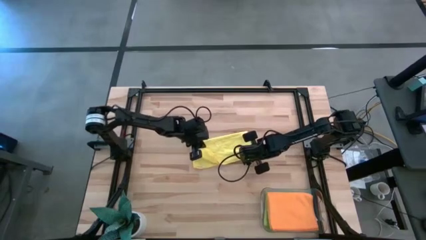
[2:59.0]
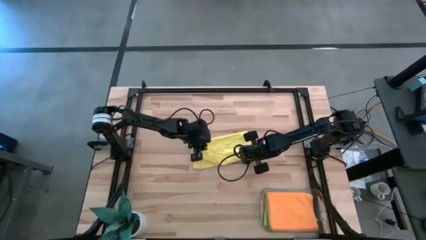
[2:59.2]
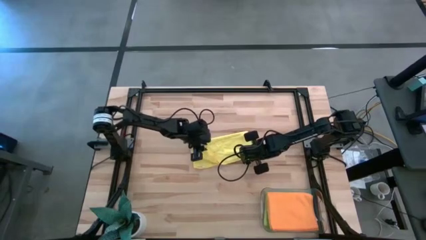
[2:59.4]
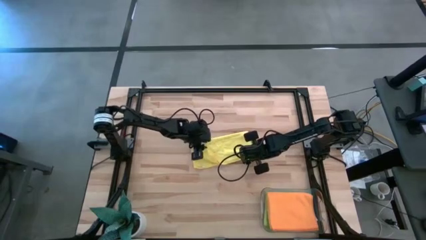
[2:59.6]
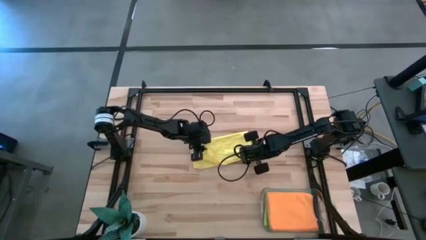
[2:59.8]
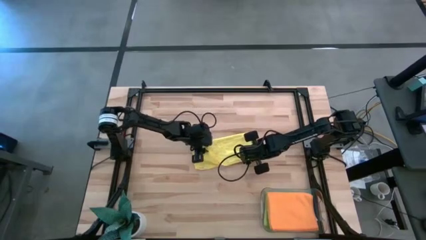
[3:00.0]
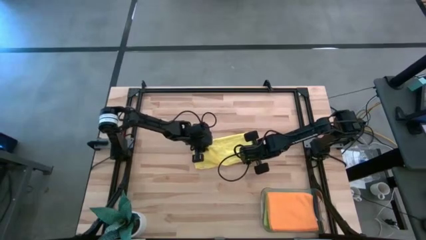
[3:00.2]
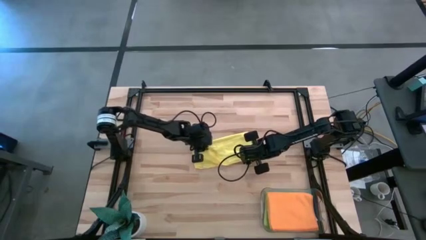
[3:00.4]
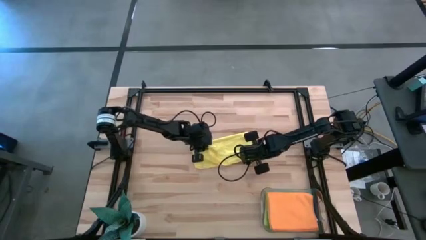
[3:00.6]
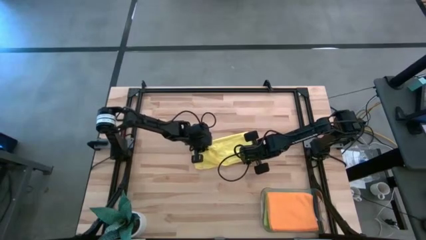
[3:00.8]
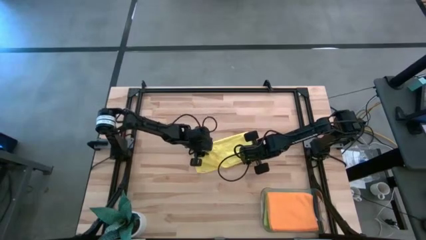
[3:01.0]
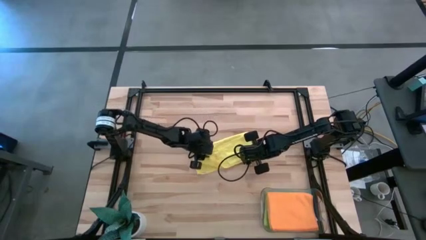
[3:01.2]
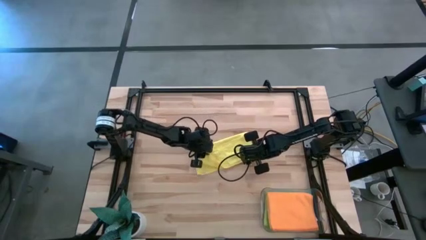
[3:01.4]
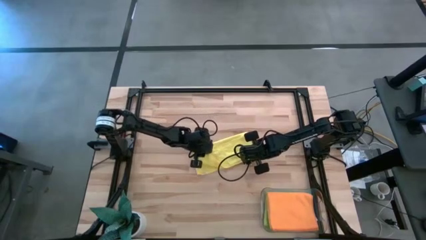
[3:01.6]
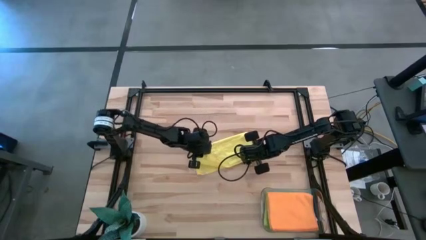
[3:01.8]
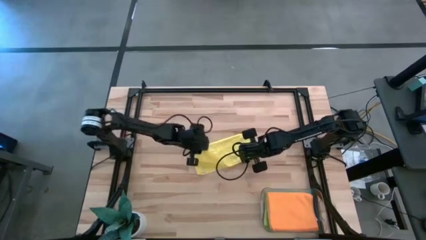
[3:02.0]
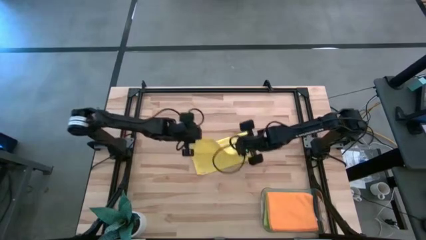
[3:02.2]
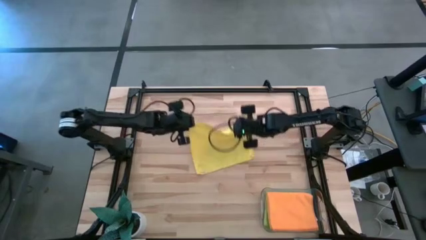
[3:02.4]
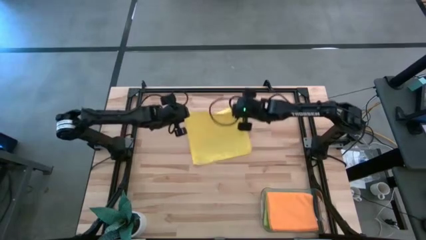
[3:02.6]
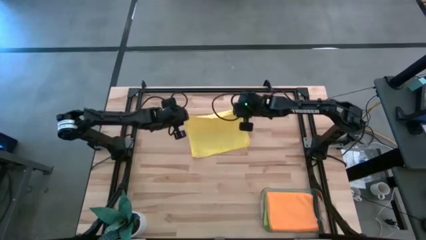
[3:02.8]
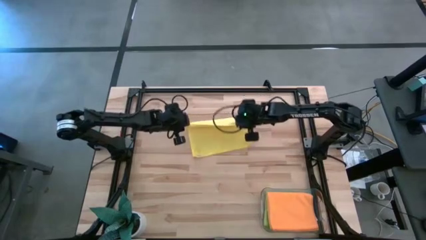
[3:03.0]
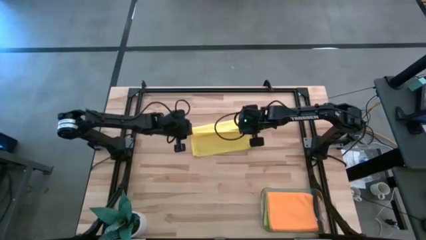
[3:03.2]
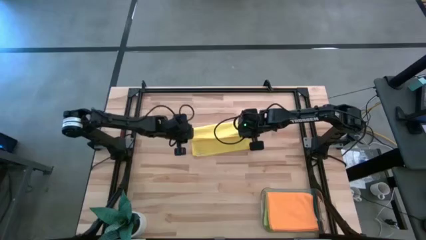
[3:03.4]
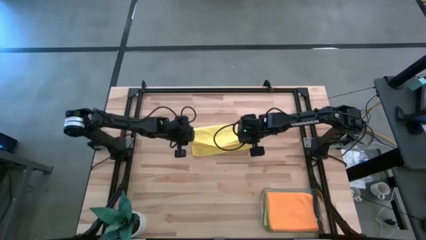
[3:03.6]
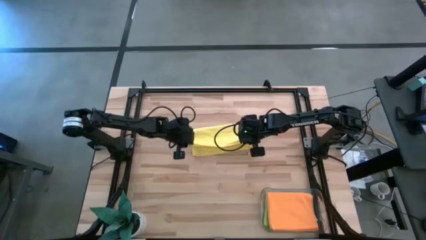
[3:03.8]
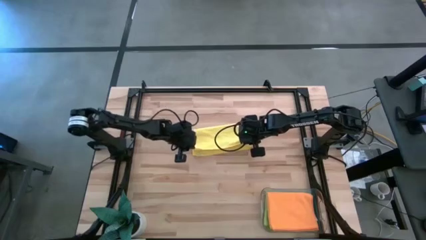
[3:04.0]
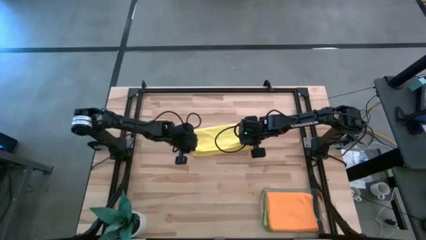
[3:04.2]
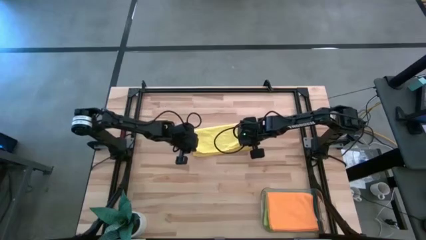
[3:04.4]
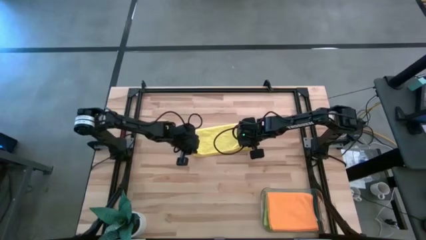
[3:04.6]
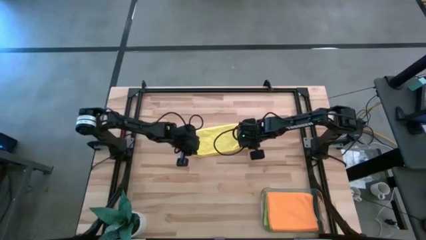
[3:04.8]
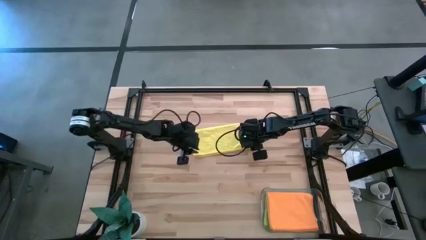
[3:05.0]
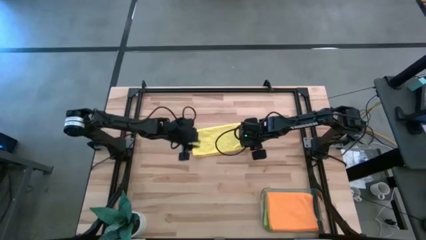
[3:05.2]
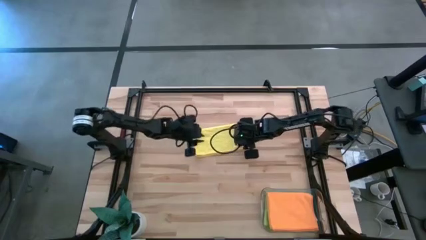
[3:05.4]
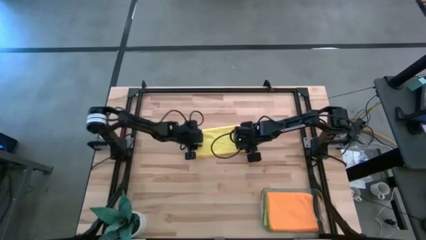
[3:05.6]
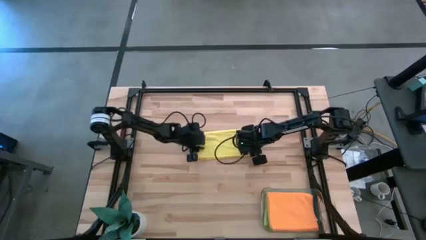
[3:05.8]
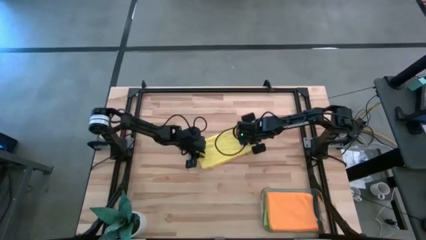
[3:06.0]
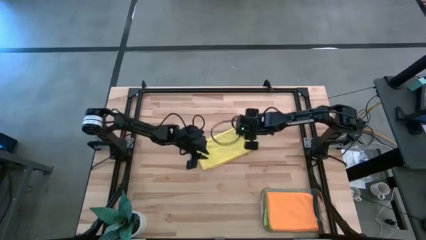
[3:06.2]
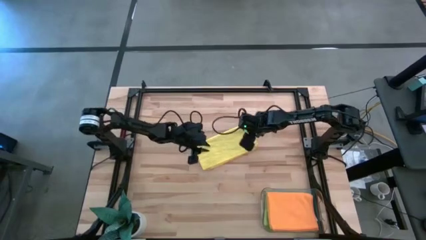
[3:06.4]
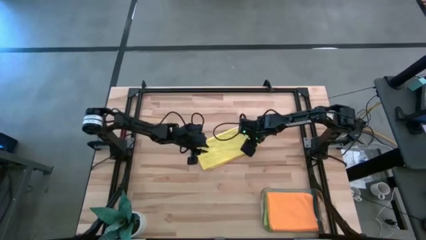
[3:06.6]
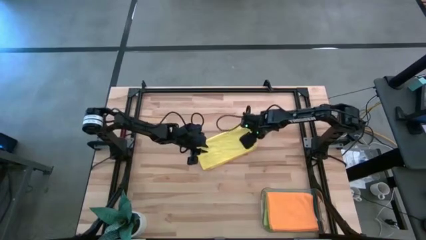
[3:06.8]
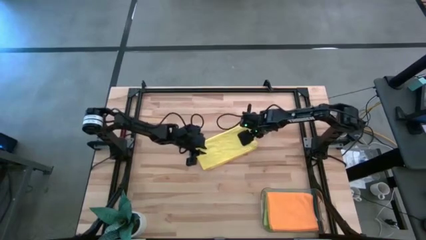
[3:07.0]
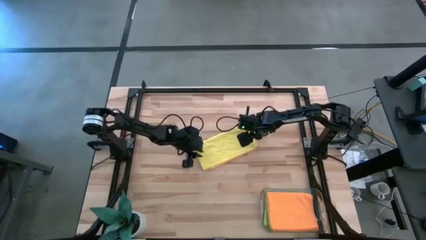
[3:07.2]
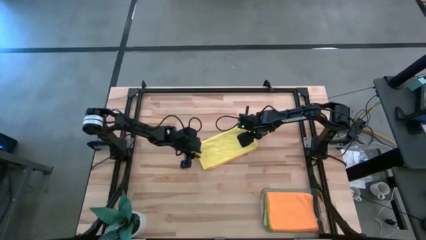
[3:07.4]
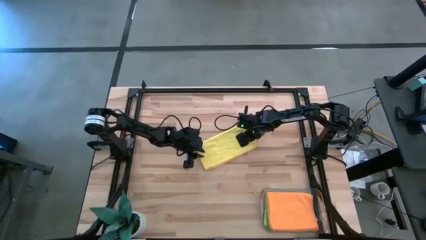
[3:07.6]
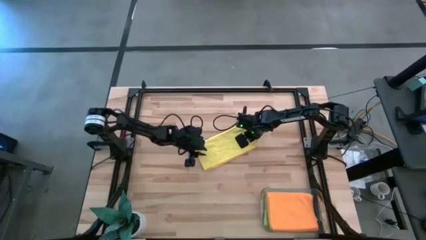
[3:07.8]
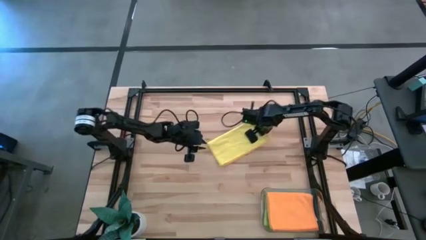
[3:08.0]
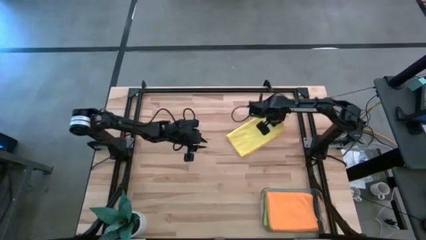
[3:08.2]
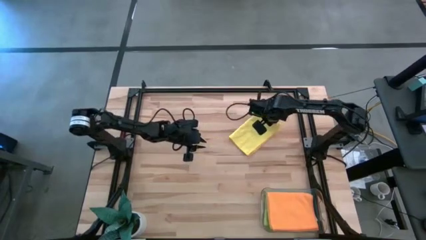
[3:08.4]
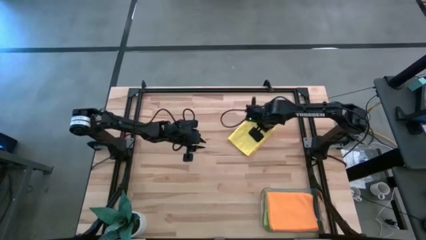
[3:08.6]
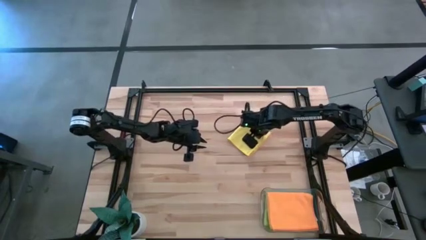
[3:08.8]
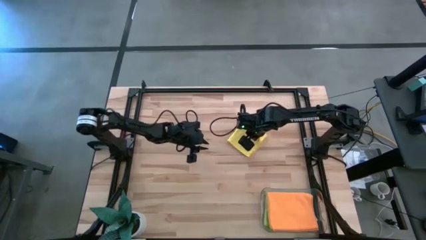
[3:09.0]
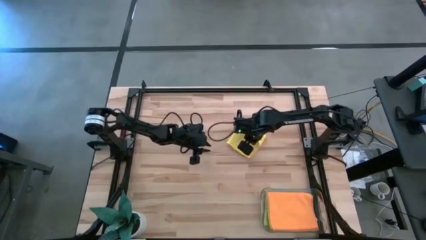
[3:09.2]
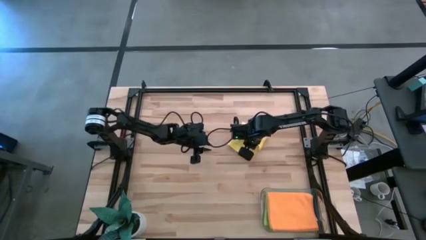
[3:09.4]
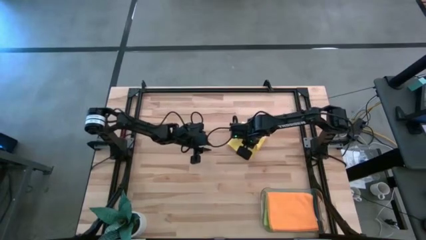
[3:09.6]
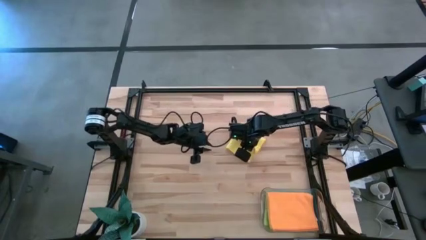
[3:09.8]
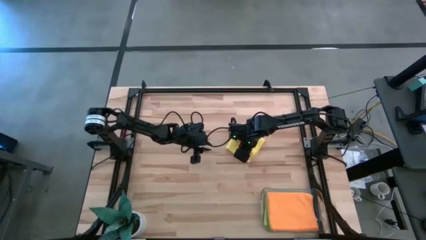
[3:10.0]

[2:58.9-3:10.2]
Task: Fold microfiber towels
Fold the yellow microfiber towel
